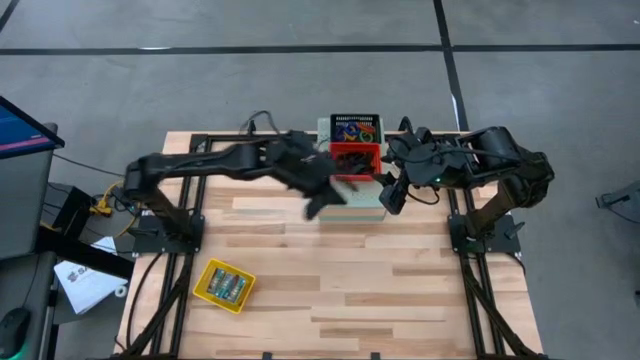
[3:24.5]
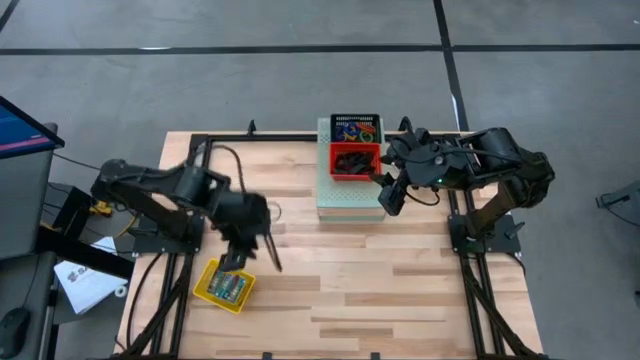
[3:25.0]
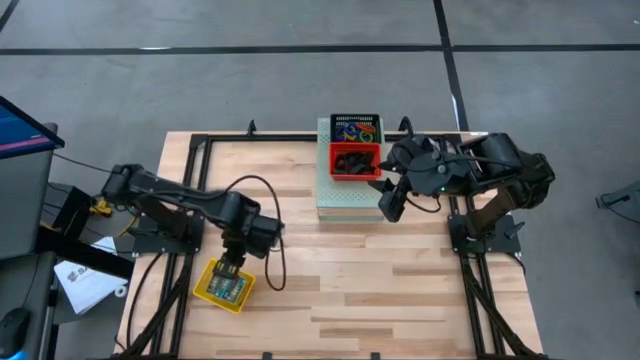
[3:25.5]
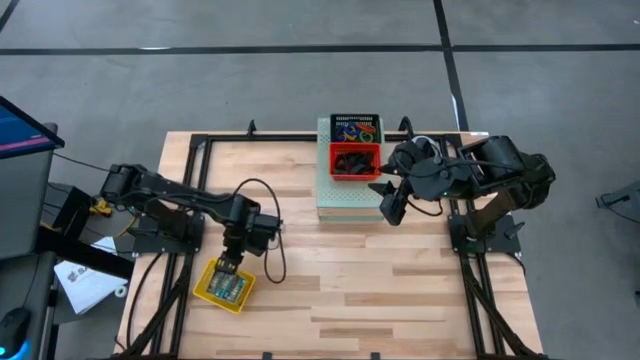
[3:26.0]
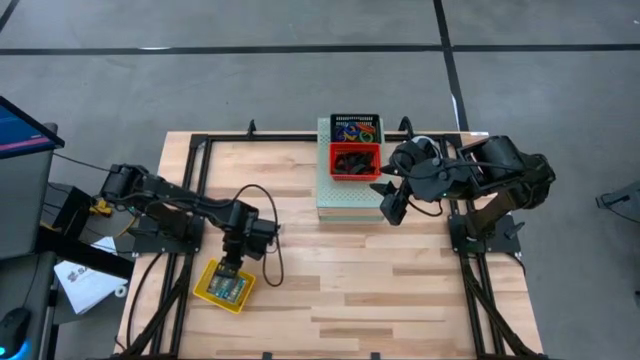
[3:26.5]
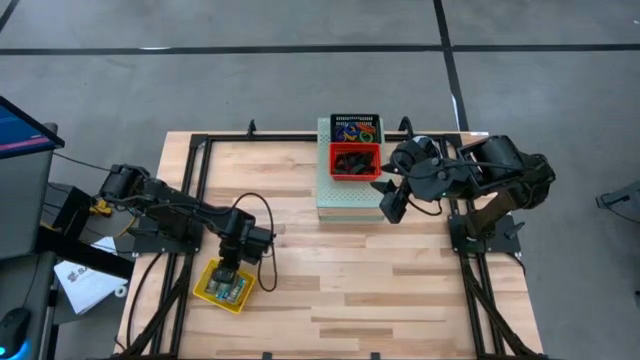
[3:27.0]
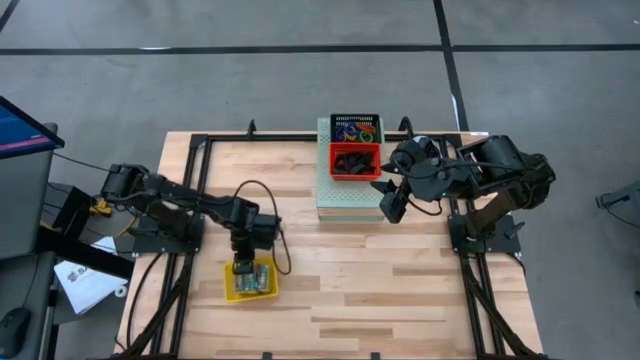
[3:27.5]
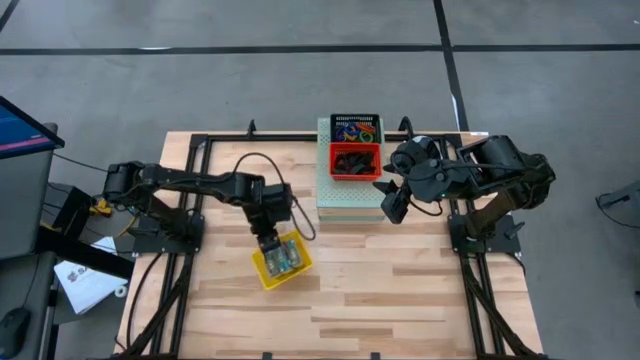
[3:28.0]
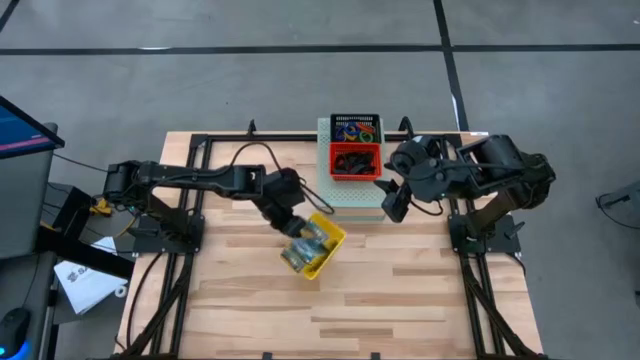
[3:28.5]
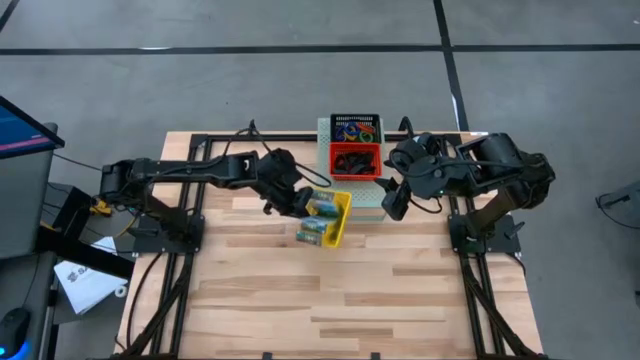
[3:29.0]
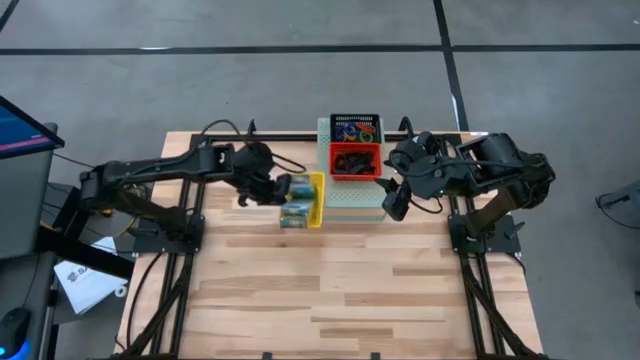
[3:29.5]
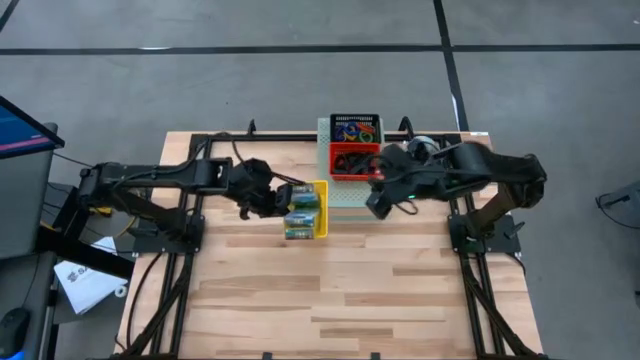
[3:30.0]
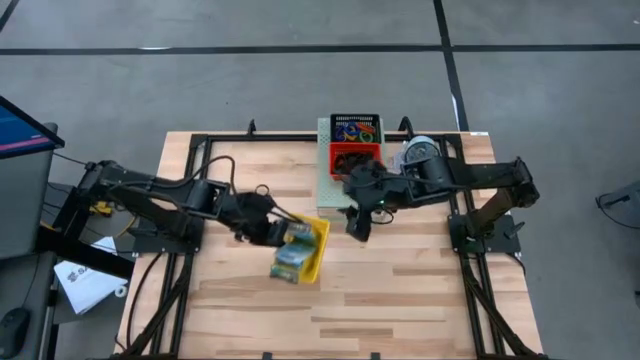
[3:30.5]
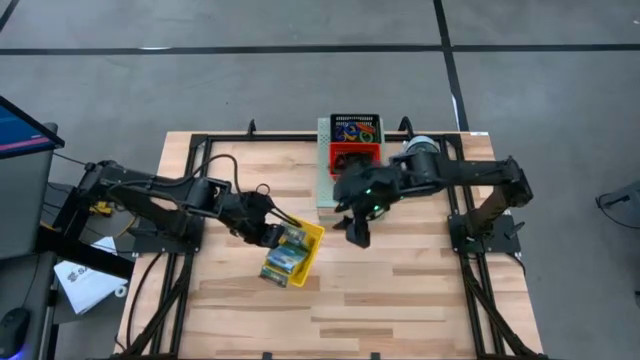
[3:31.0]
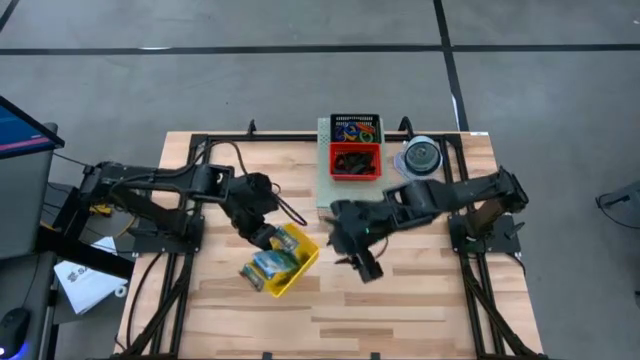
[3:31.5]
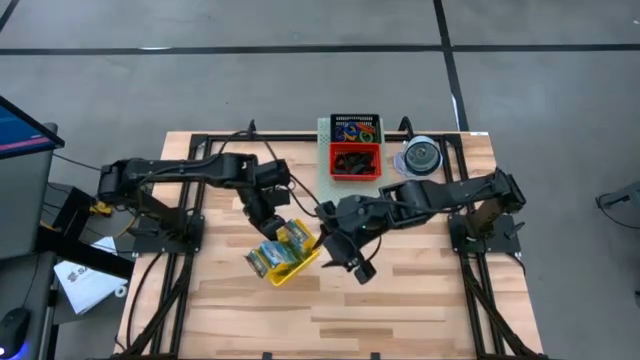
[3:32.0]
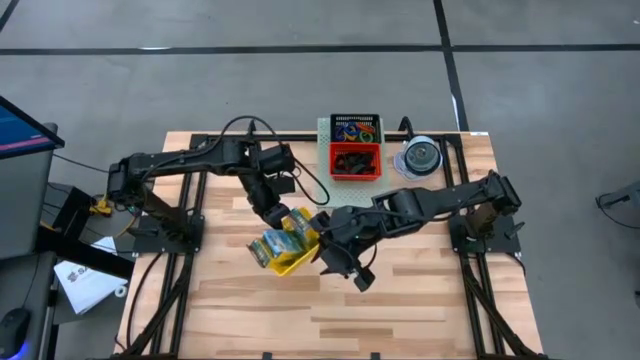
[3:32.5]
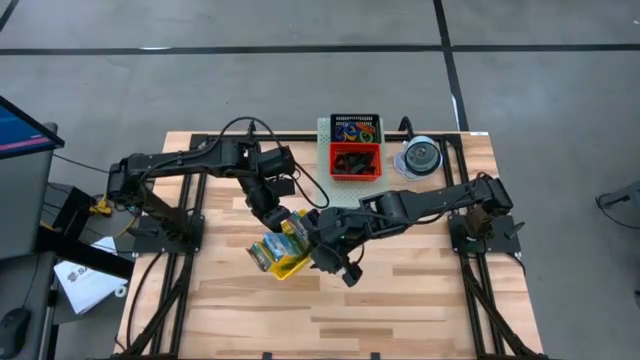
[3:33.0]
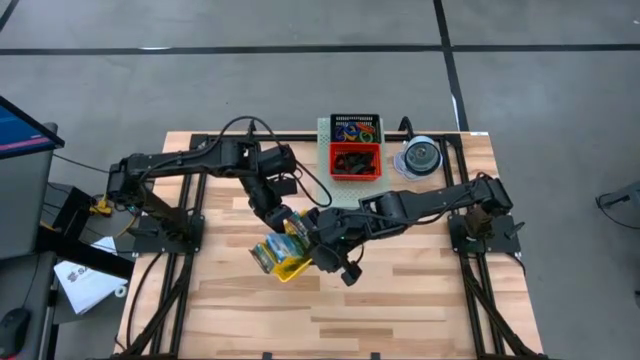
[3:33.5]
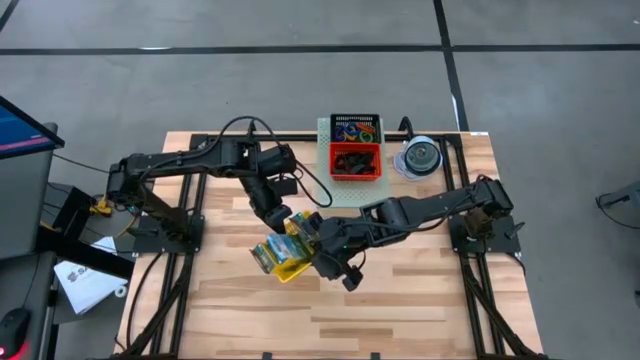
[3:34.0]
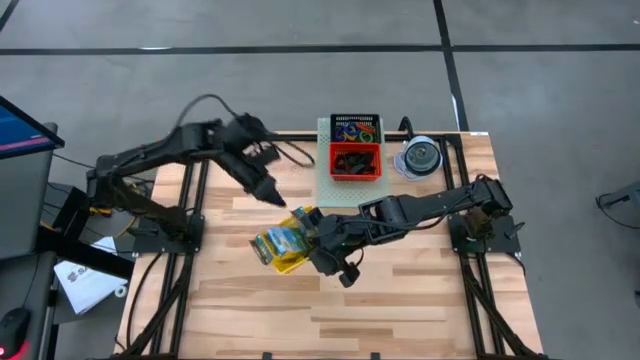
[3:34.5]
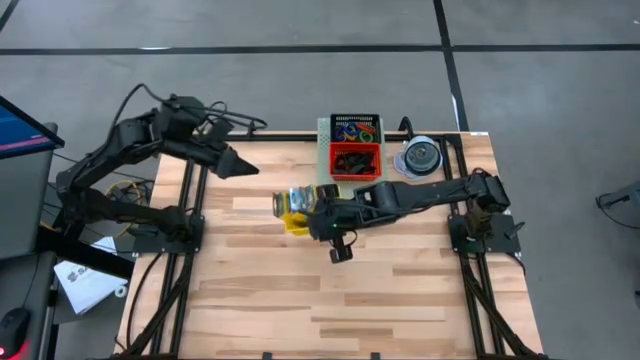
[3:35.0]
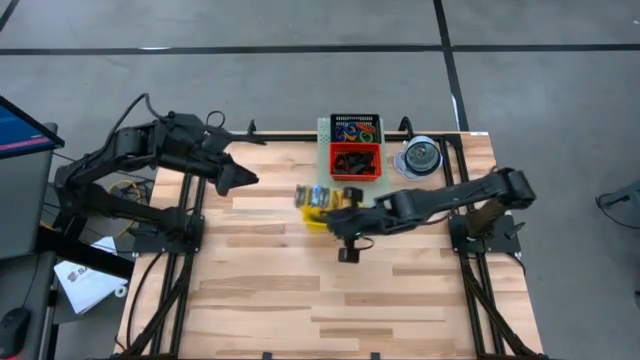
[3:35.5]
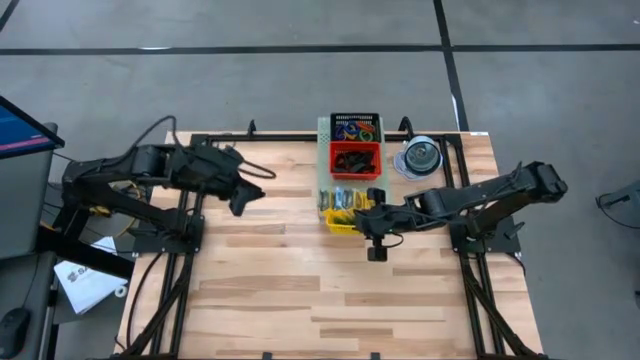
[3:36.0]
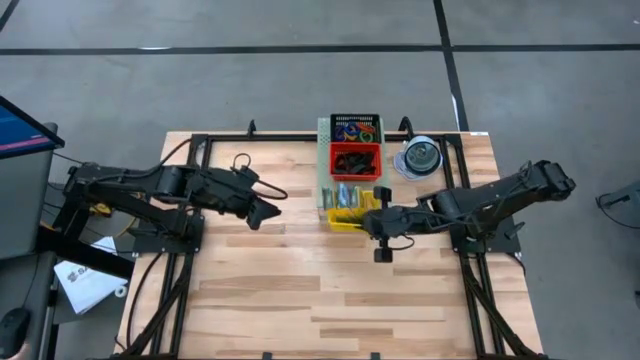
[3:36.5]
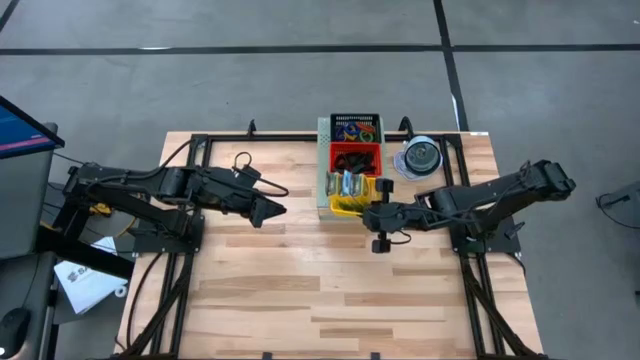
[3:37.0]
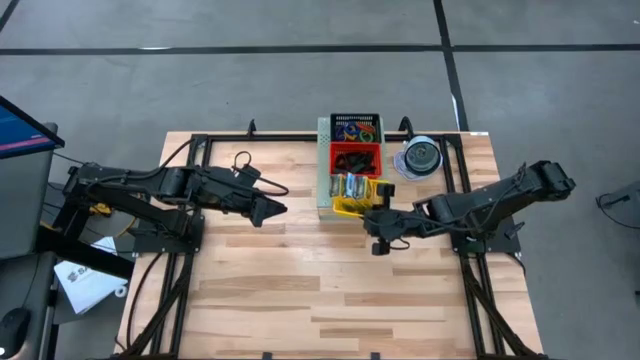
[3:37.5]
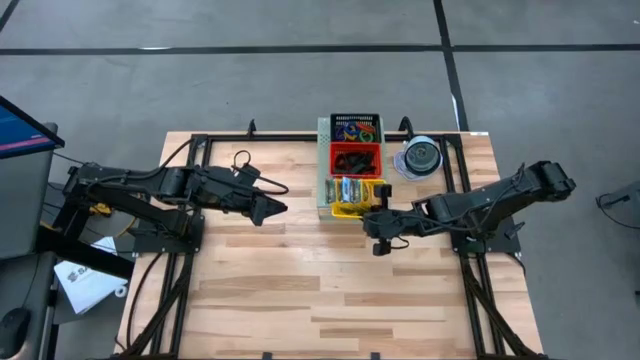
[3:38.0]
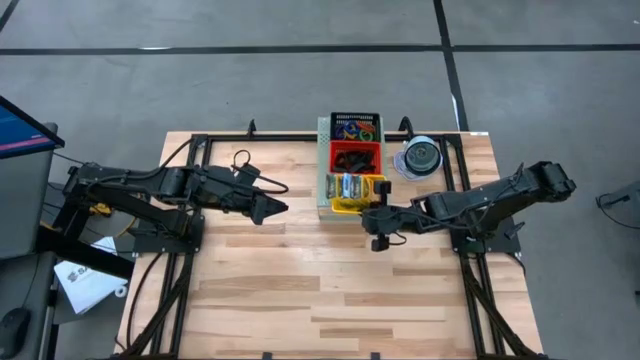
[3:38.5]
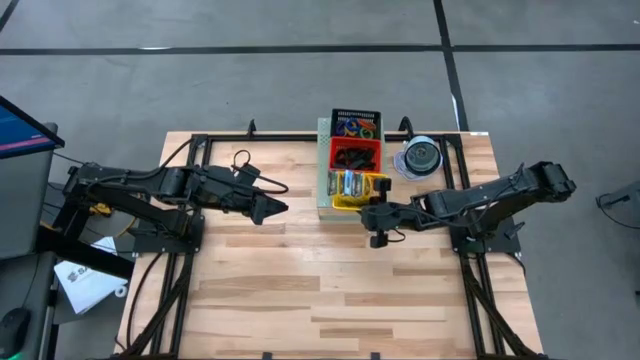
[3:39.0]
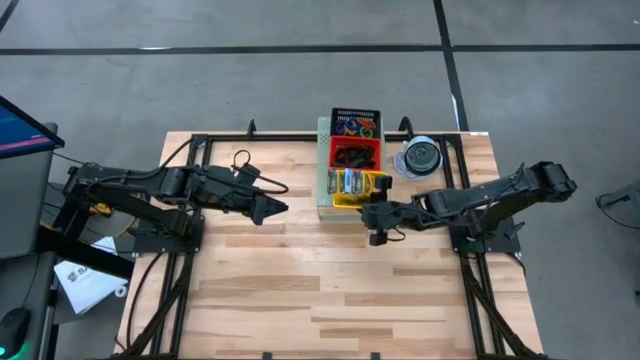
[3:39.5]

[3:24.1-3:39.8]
Task: Pick & Place Office Desk Supplies
Put the yellow bin on the shelf

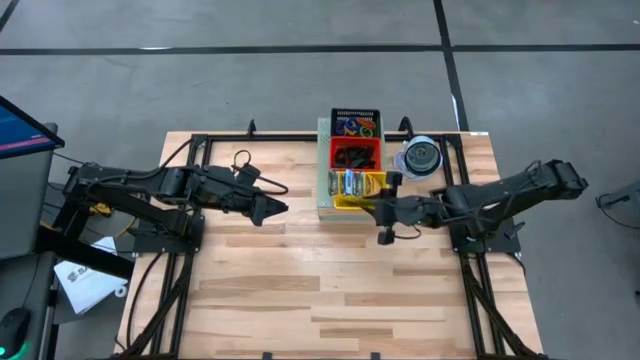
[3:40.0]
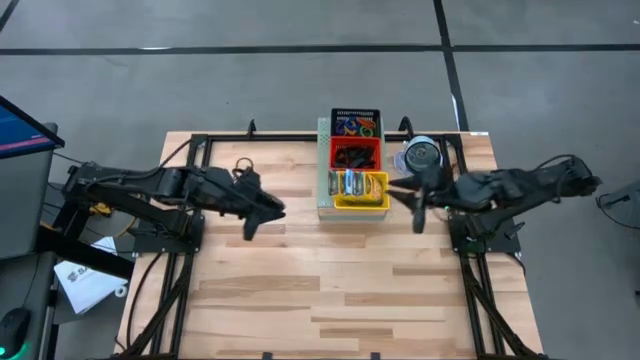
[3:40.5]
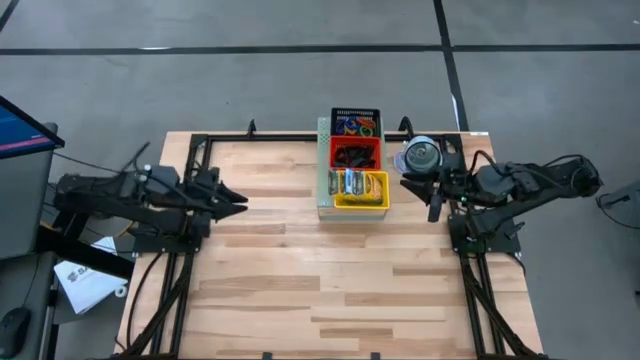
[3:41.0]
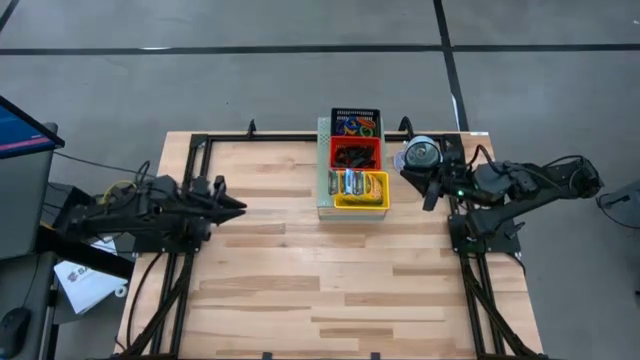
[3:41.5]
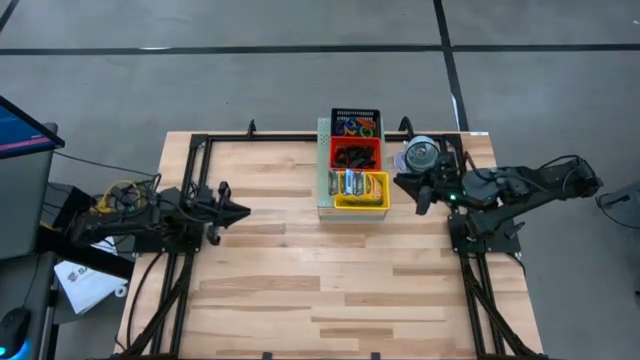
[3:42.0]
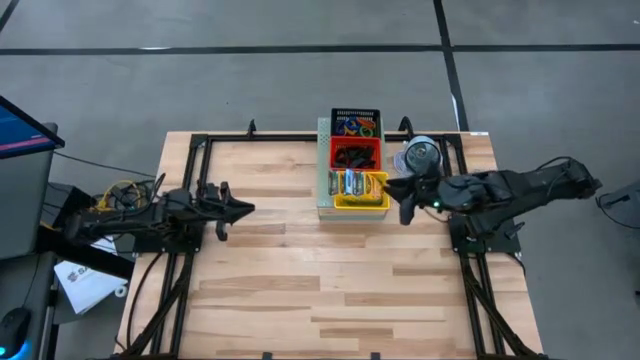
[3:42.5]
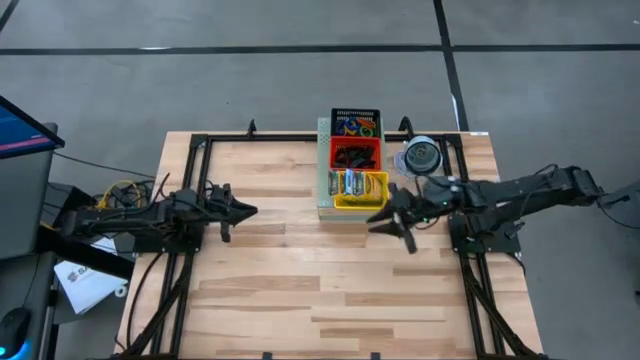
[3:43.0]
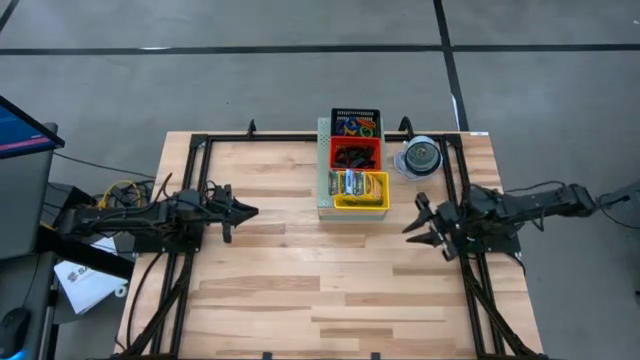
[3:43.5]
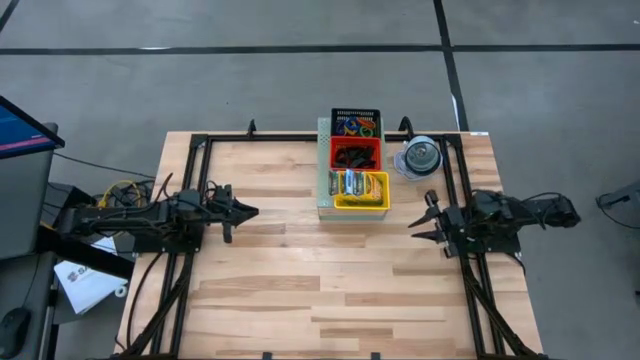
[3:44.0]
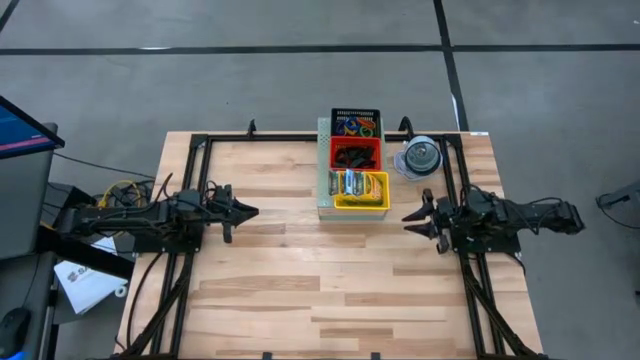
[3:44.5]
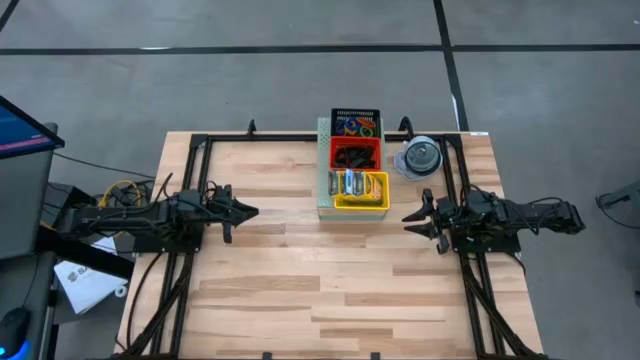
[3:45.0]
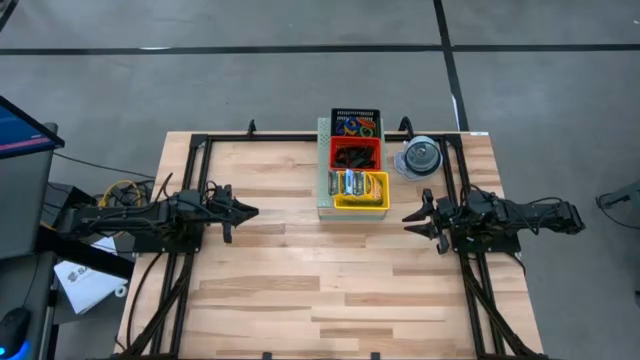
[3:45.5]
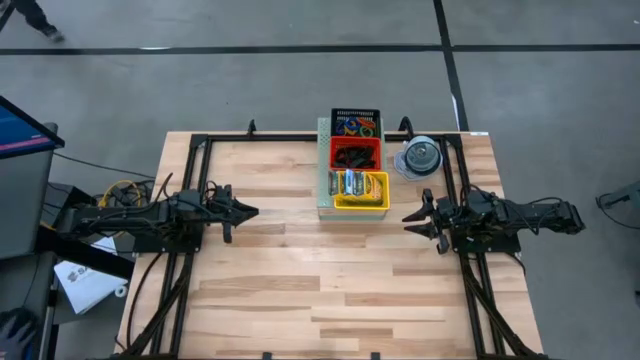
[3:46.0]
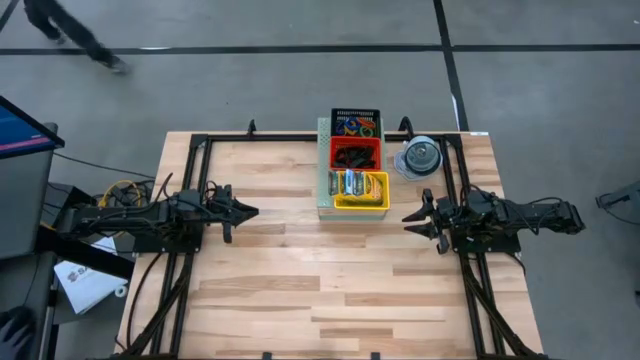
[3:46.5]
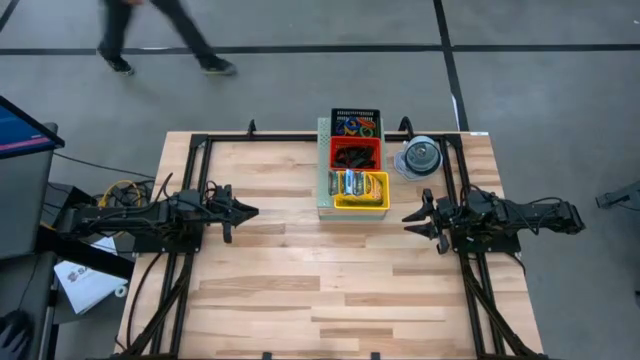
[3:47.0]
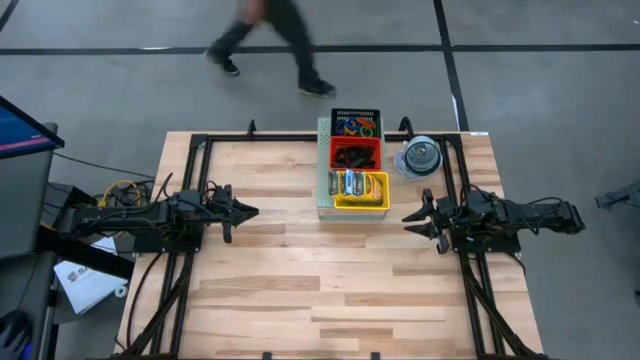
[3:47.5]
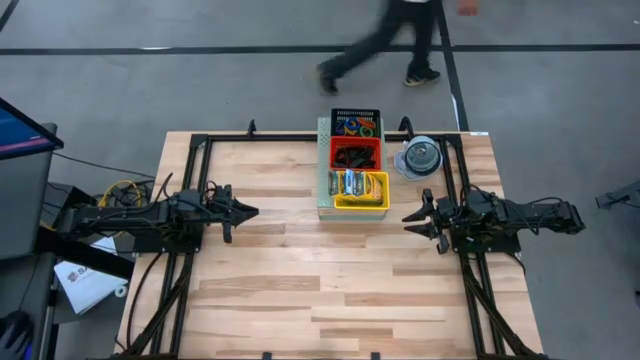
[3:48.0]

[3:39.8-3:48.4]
Return to Home Position
